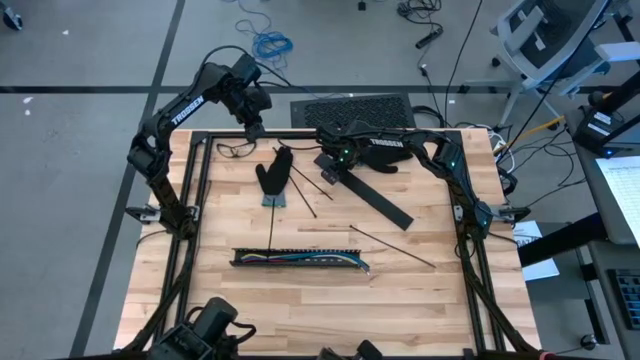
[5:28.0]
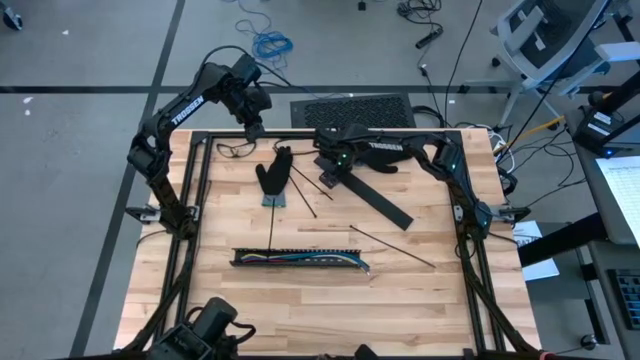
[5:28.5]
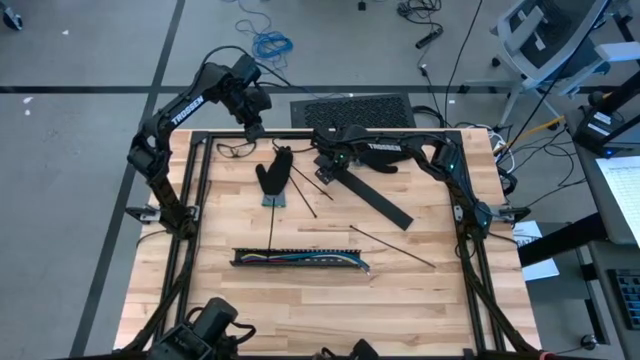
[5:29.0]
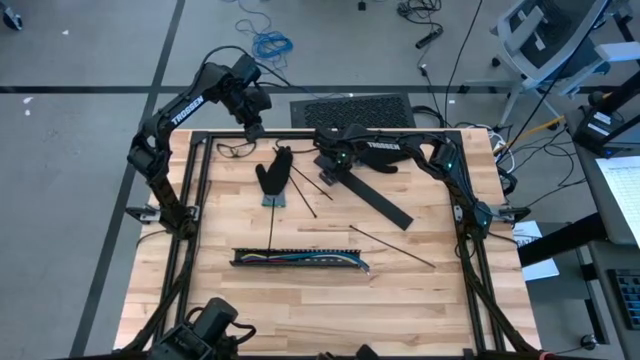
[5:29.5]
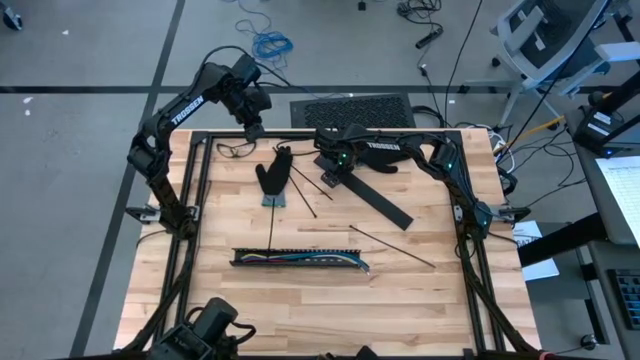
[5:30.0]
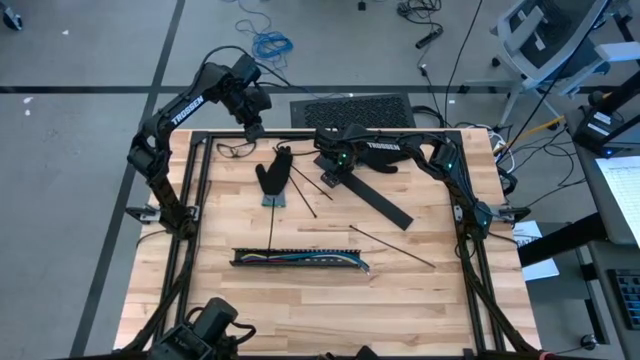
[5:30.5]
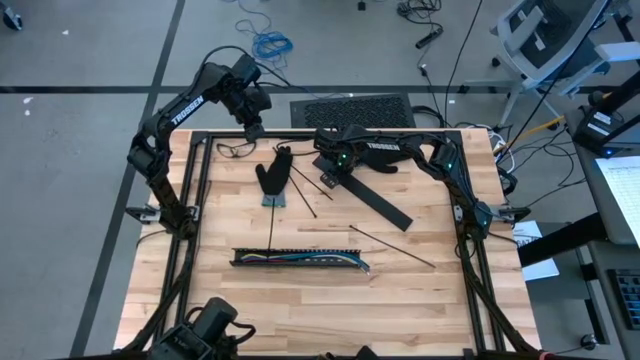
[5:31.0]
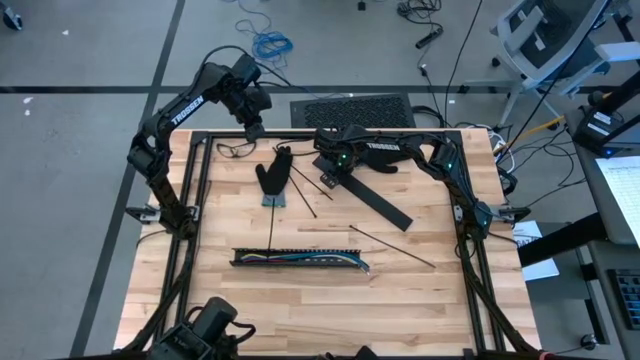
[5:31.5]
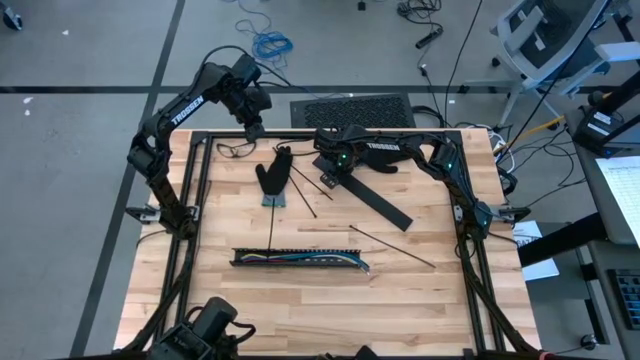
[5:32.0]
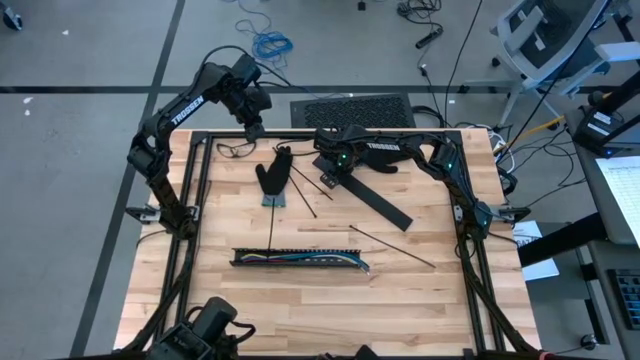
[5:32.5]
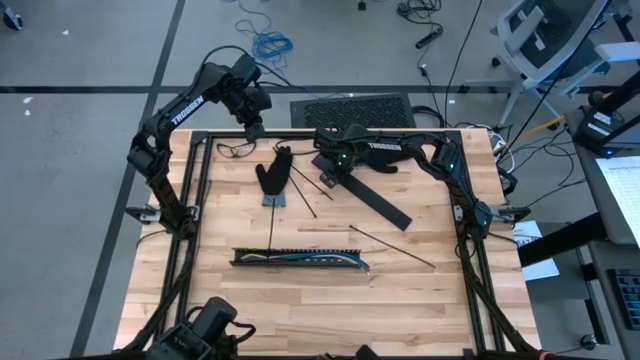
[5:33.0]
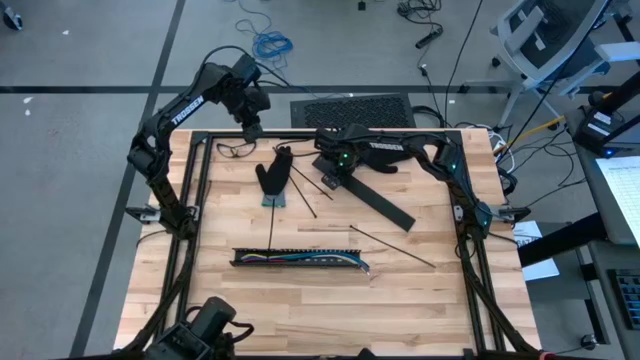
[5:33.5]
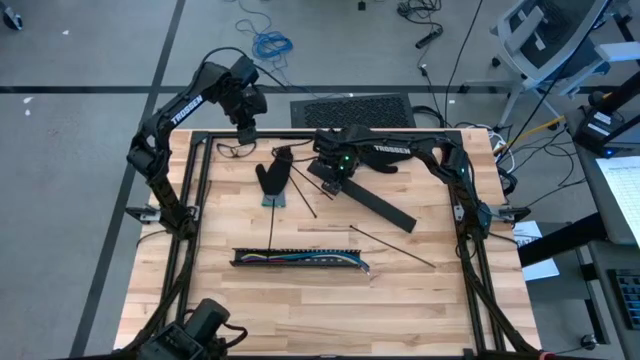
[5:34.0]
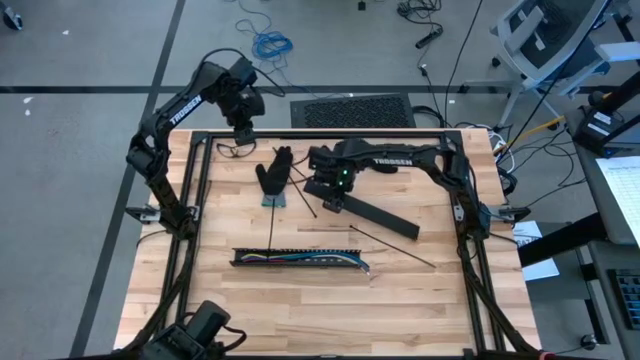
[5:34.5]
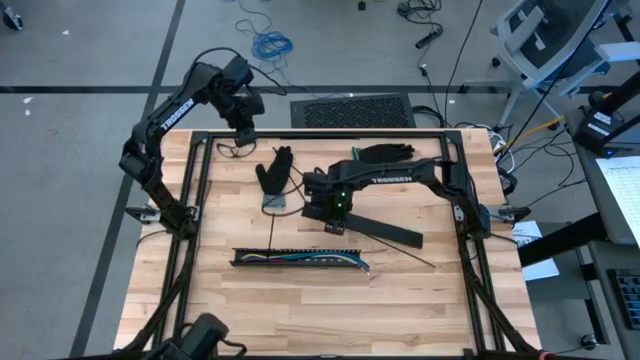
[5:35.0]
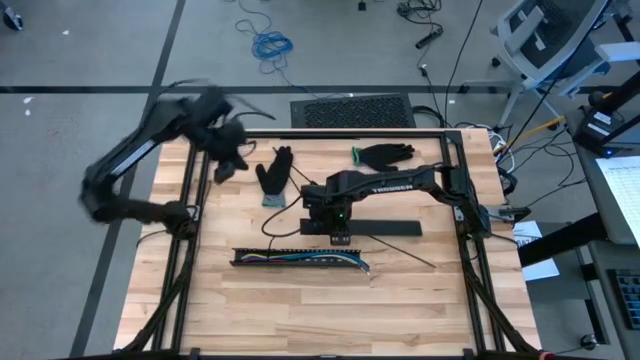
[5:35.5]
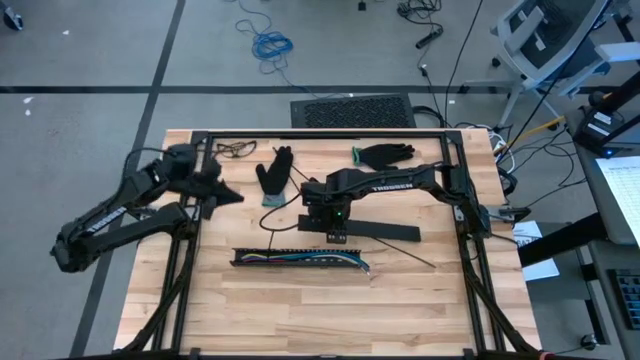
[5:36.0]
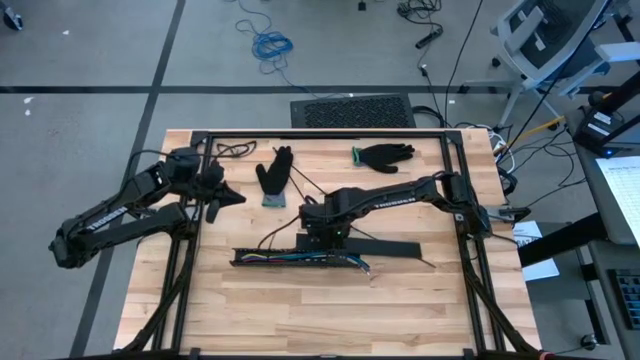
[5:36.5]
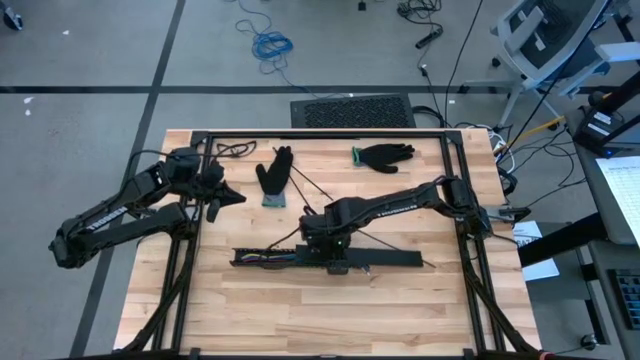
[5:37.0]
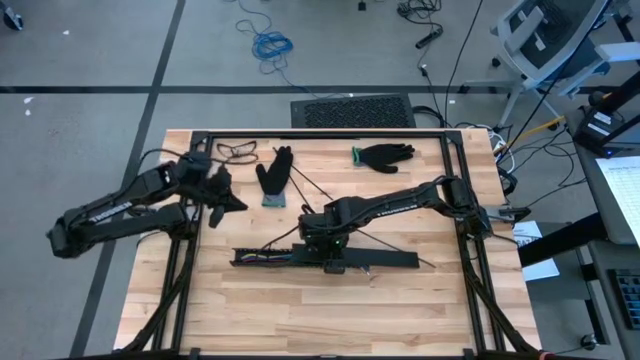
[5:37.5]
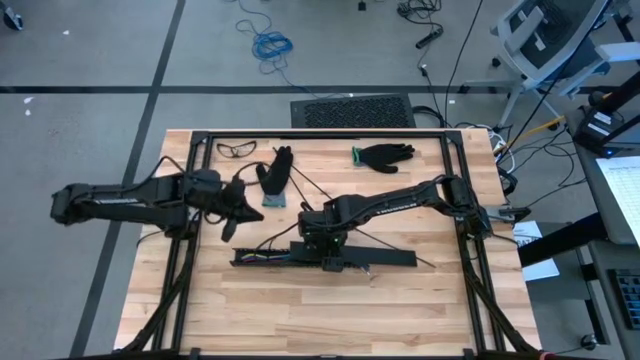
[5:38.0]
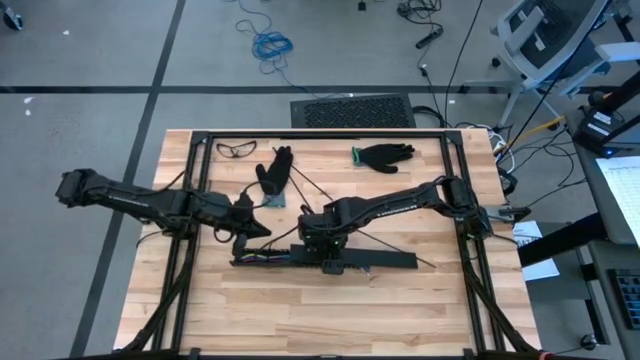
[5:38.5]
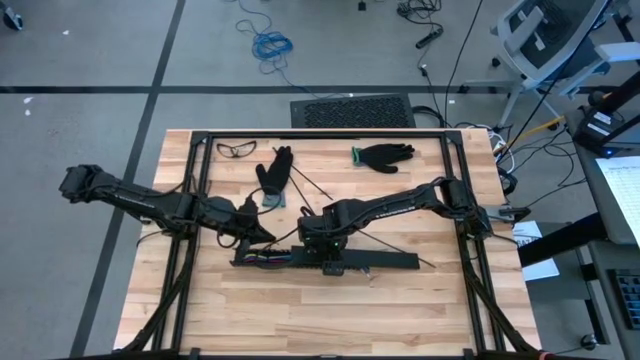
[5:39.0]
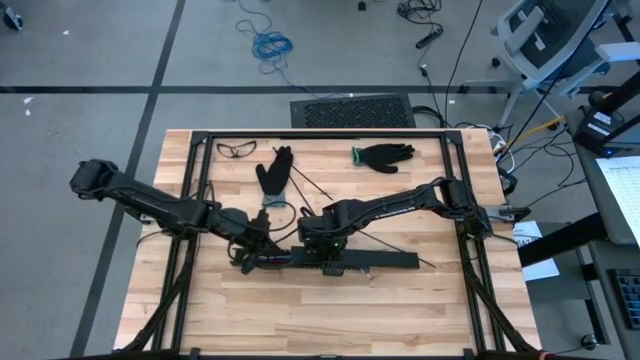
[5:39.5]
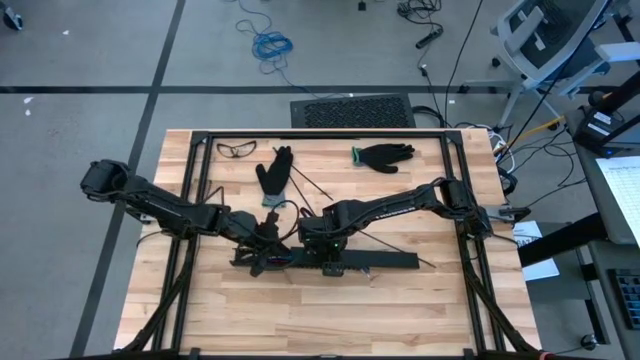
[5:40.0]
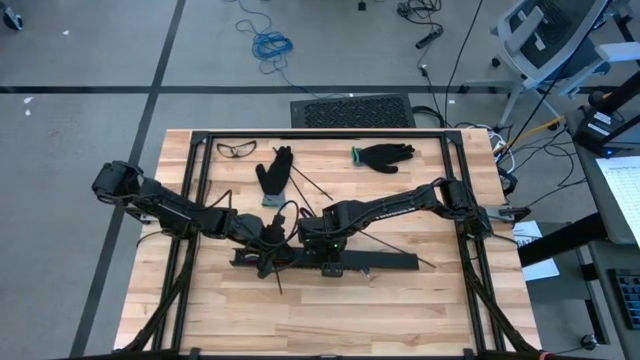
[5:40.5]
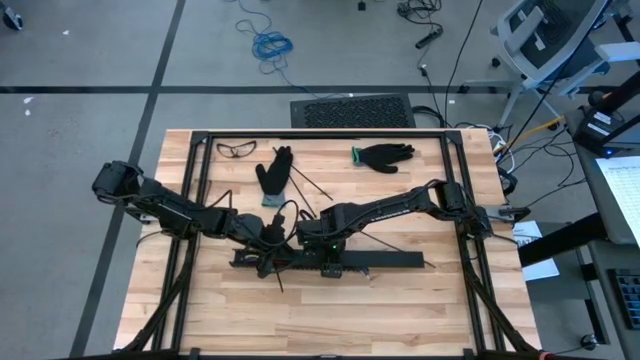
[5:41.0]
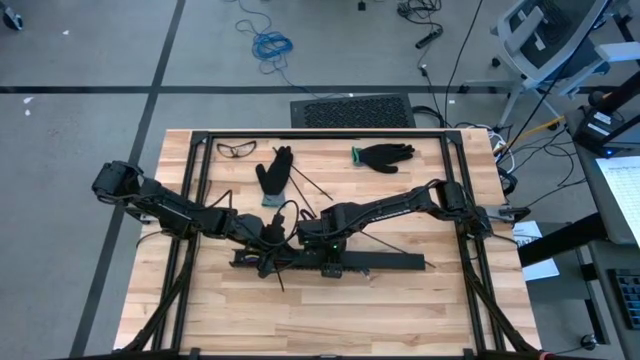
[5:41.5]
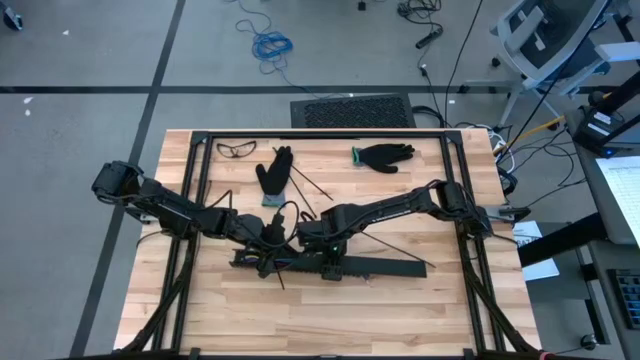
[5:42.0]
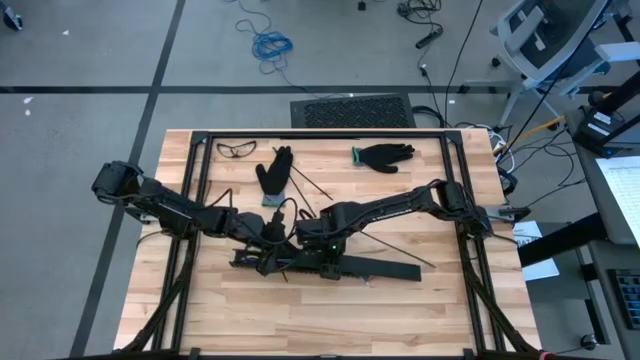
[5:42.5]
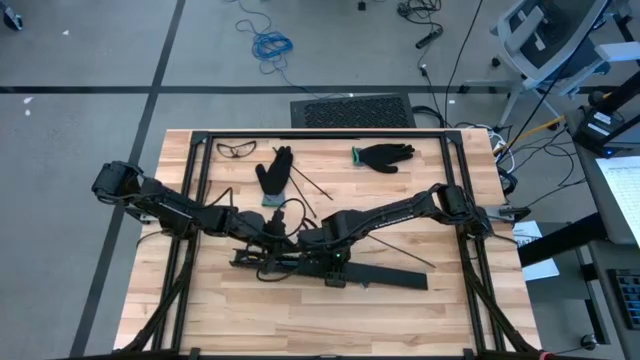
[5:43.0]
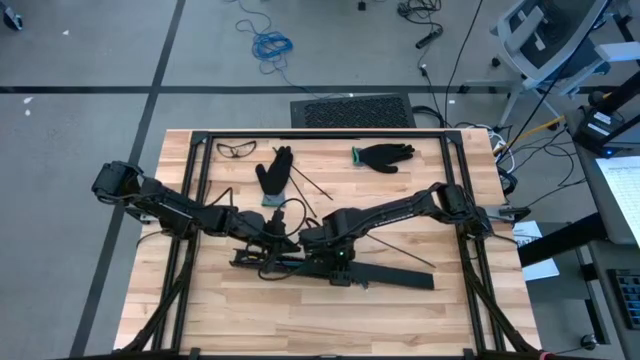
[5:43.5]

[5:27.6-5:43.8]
Task: Ziptie cables
Insert the black cover of the black cable duct

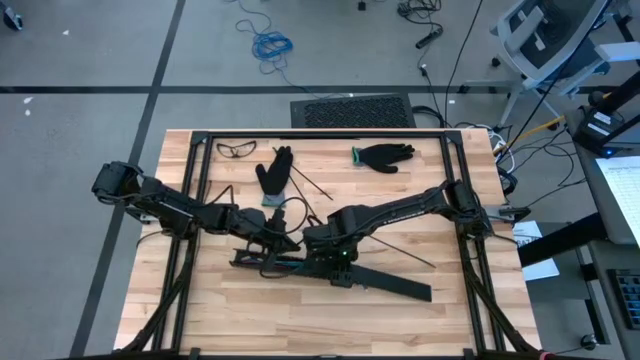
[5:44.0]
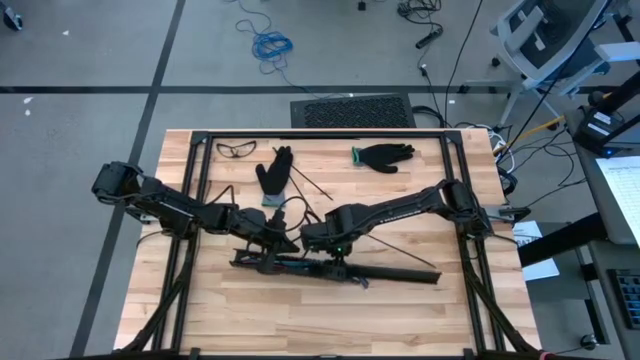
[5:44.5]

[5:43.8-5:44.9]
Insert the black cover of the black cable duct

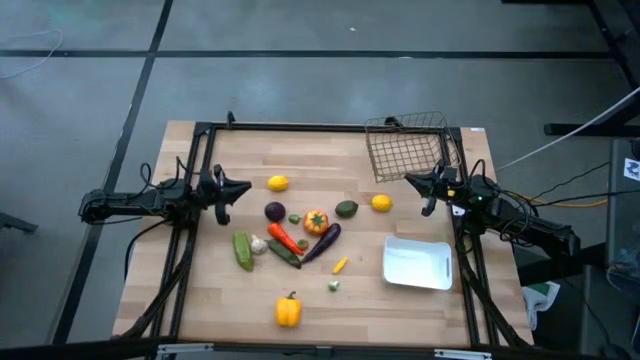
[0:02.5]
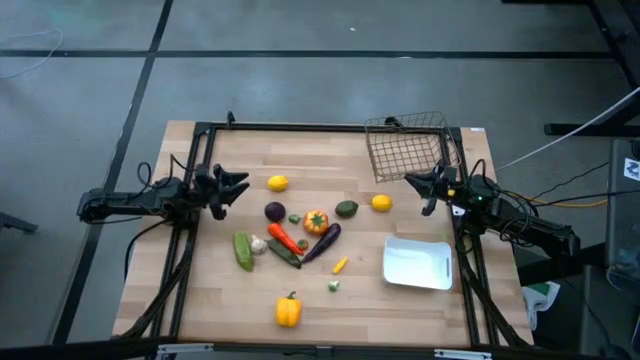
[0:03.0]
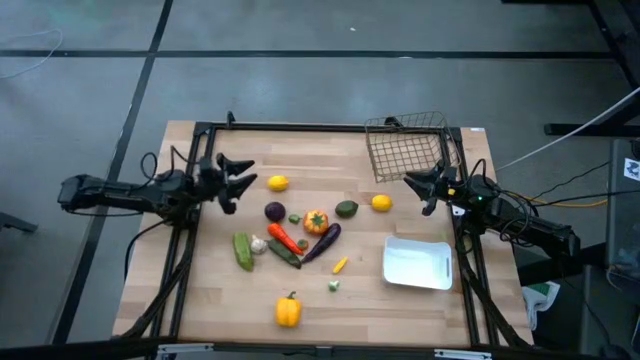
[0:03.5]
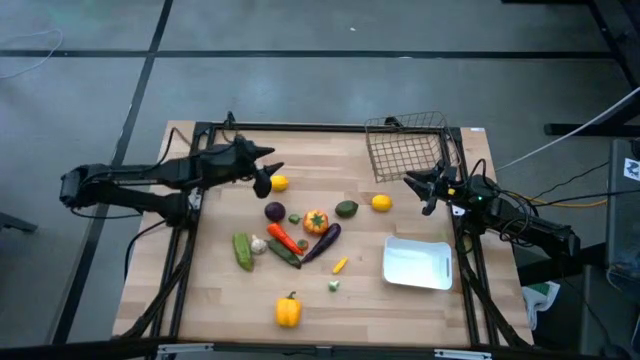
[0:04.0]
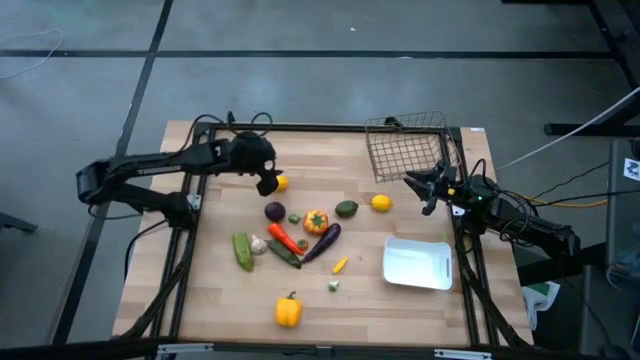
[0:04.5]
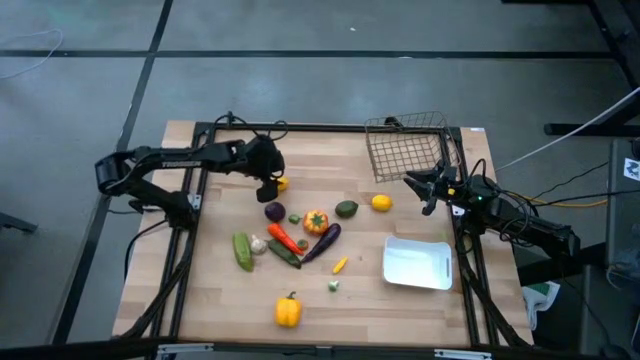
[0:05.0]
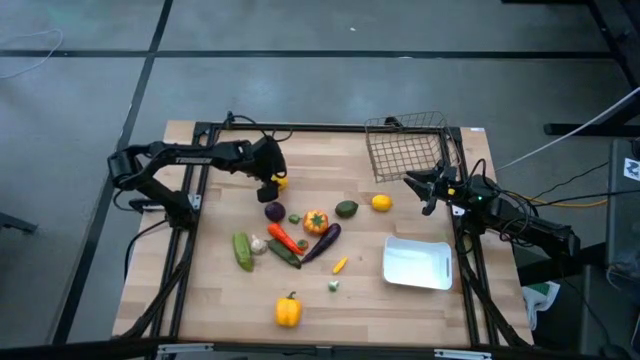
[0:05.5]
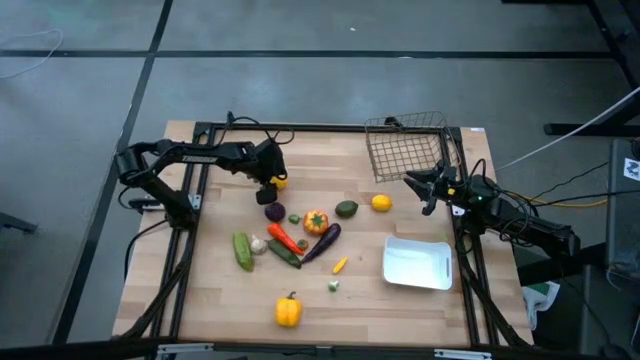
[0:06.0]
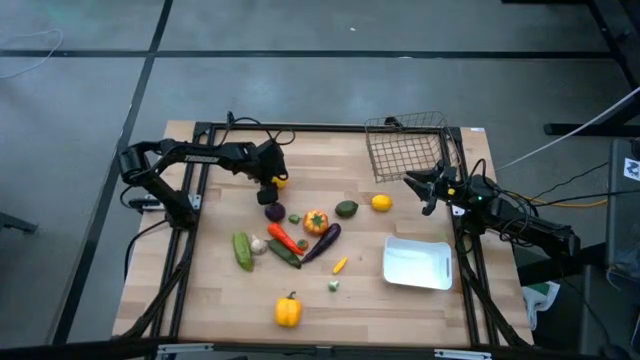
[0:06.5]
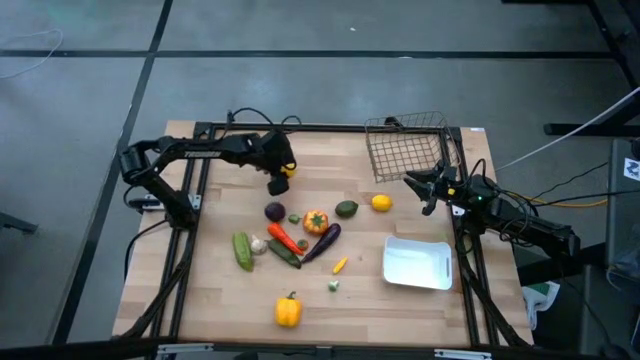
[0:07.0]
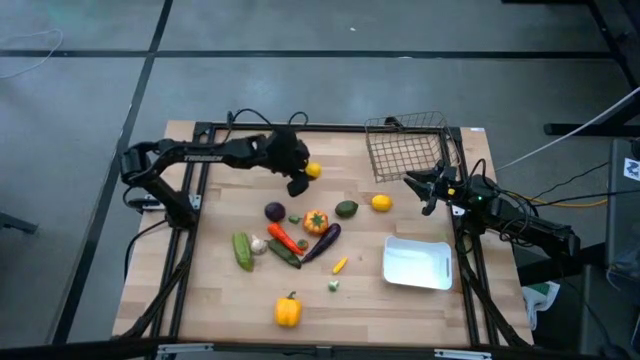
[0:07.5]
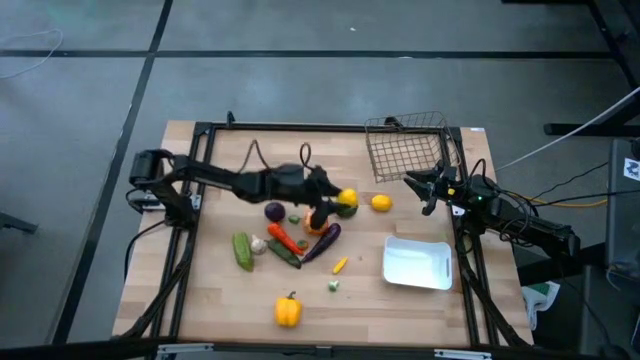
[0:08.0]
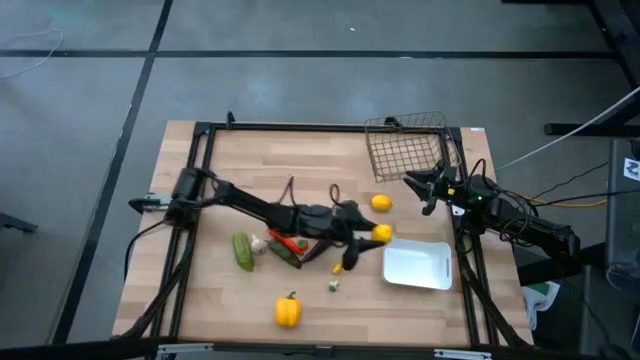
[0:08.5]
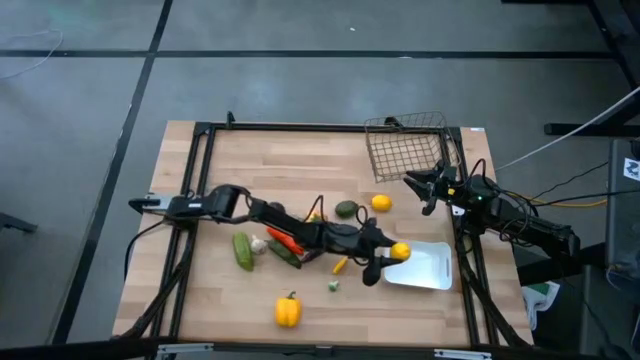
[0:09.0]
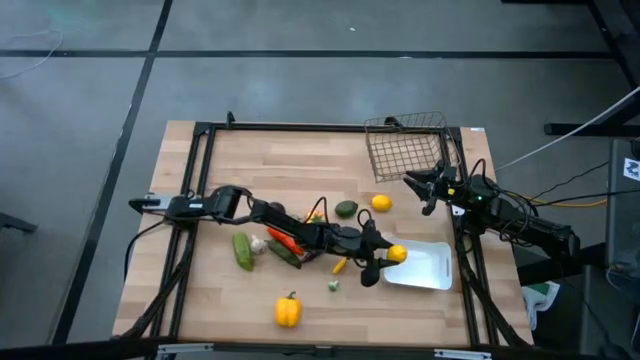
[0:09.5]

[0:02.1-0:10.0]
Task: Sort produce into baskets
Put the left yellow lemon into the white bin
